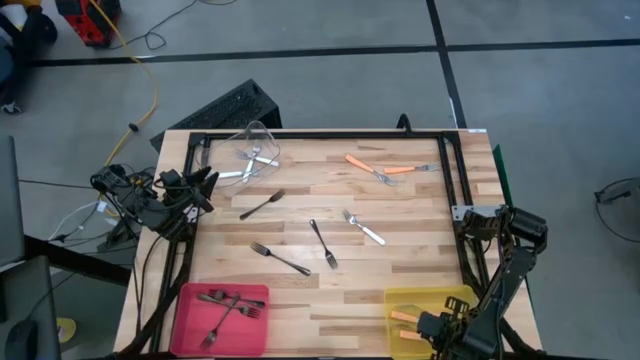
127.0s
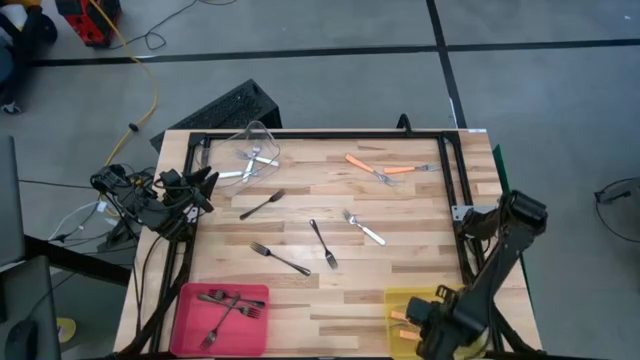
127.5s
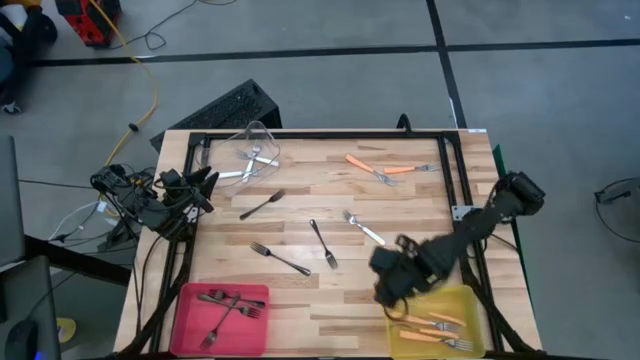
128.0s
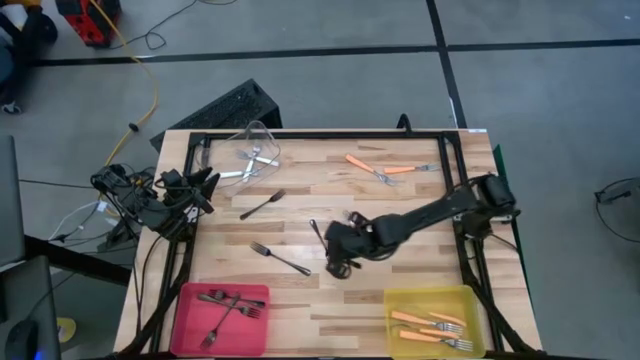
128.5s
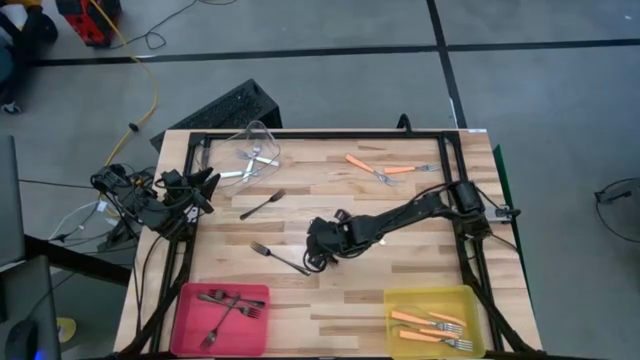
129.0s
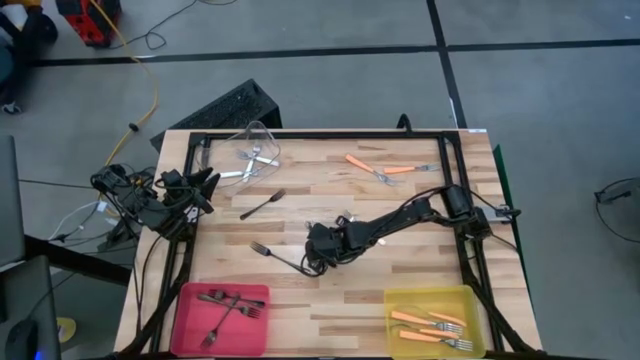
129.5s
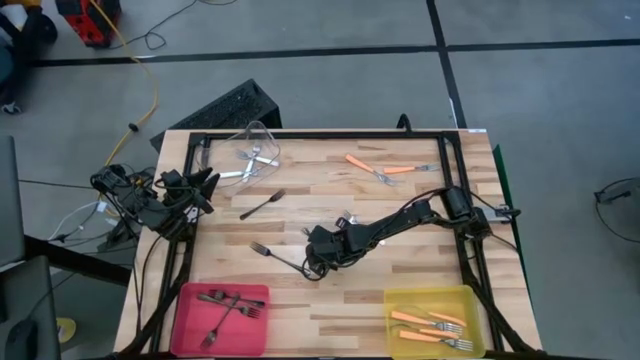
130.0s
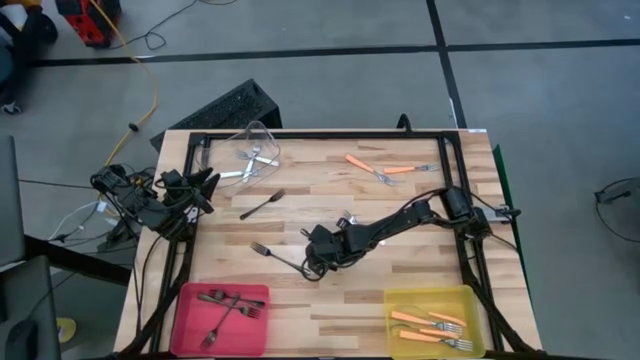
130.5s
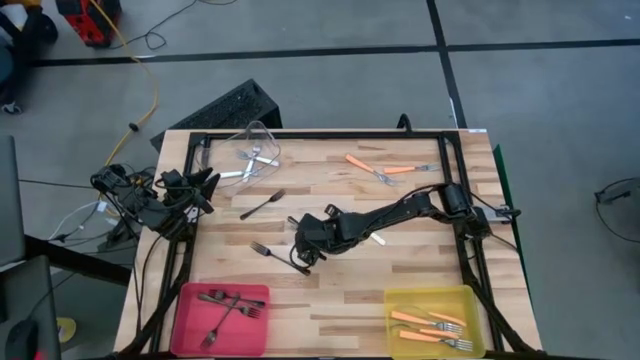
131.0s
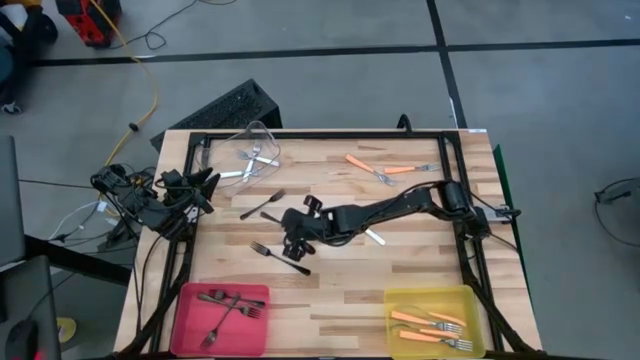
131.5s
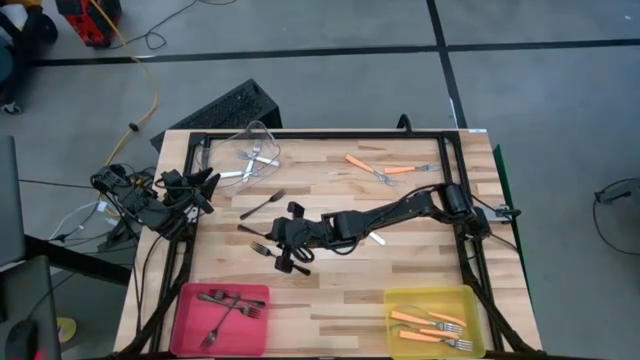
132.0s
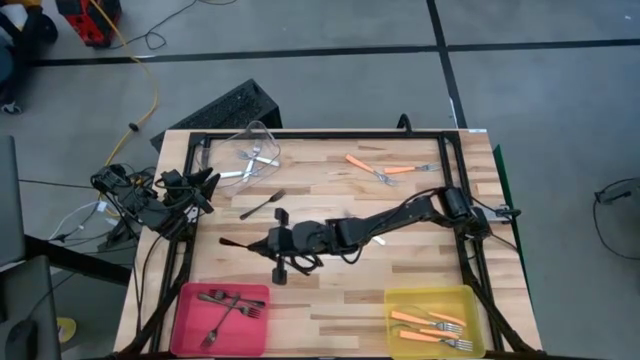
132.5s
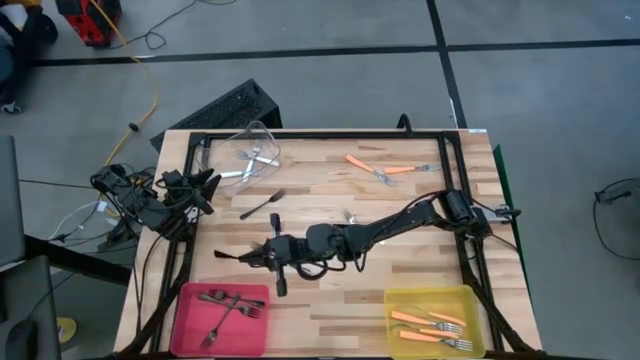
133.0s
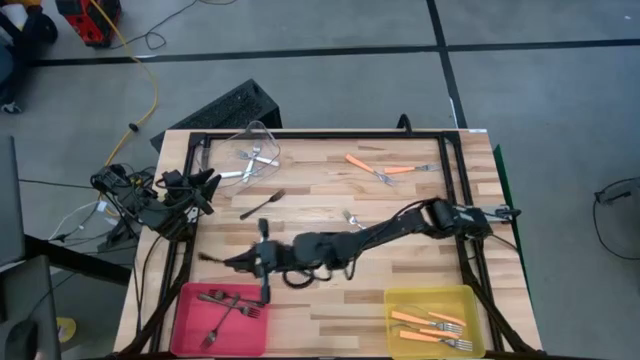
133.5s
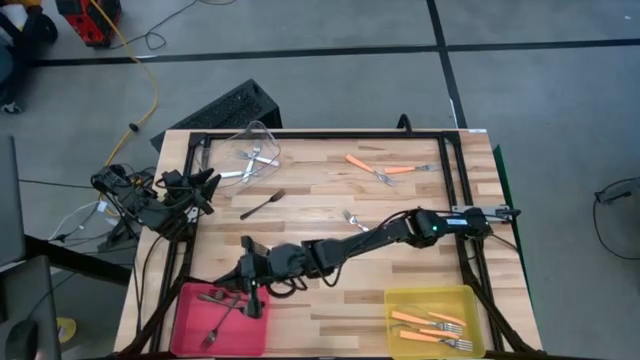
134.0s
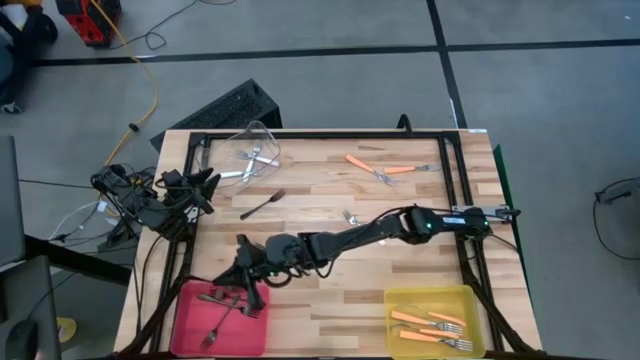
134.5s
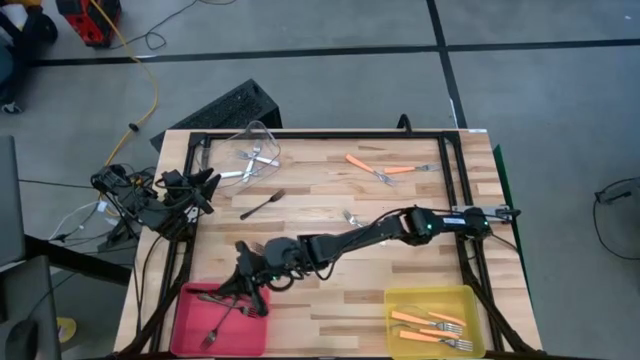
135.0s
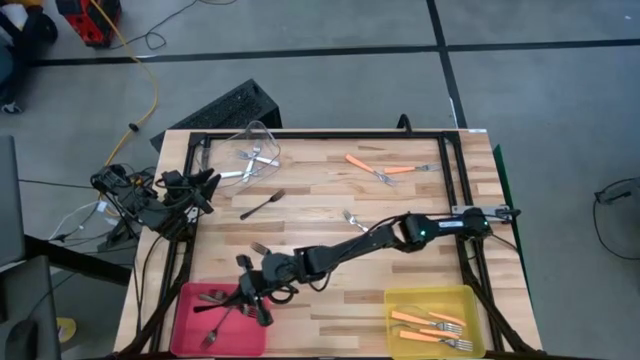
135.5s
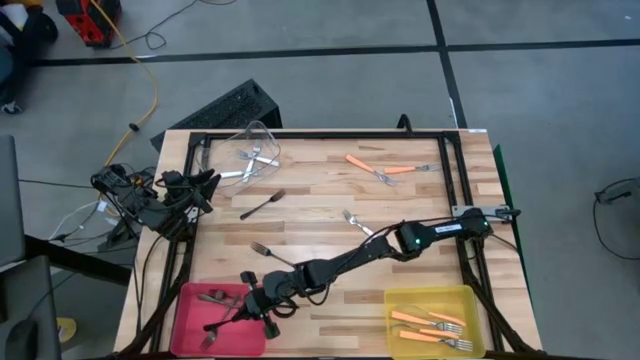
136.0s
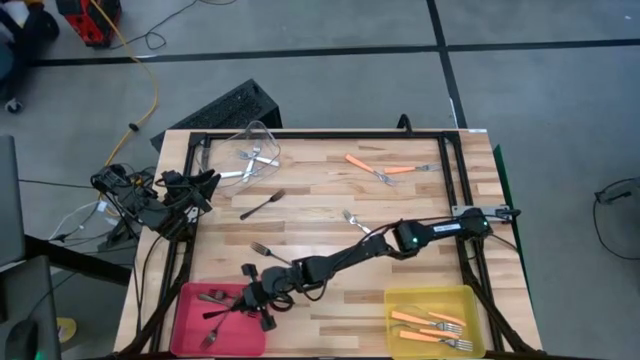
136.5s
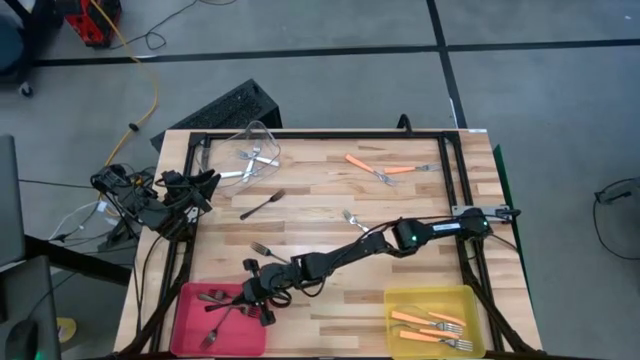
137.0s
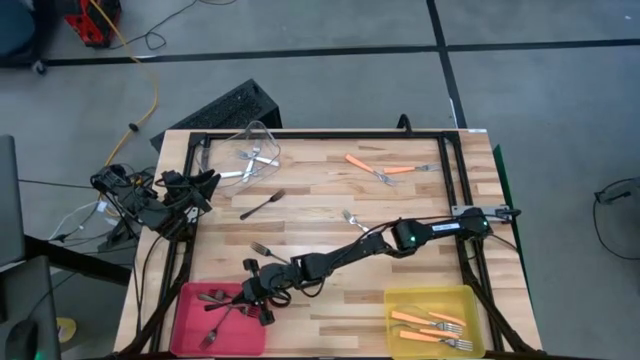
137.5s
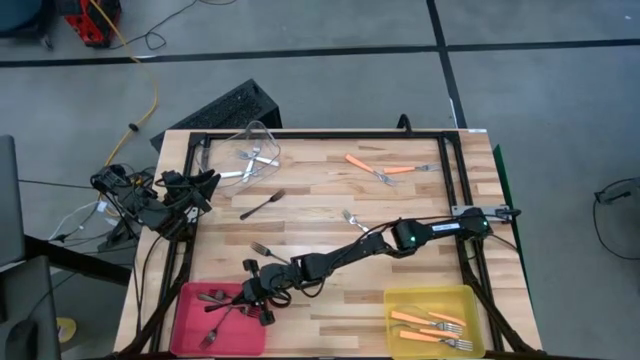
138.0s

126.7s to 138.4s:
Task: Sort silverware by color (type)
Put the black fork into the red bin

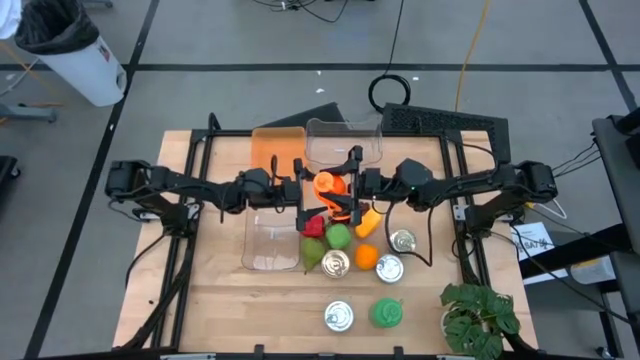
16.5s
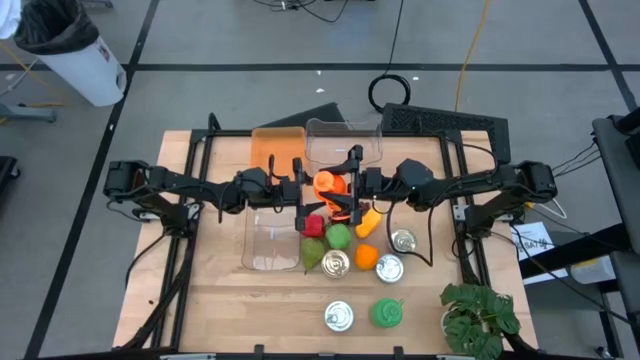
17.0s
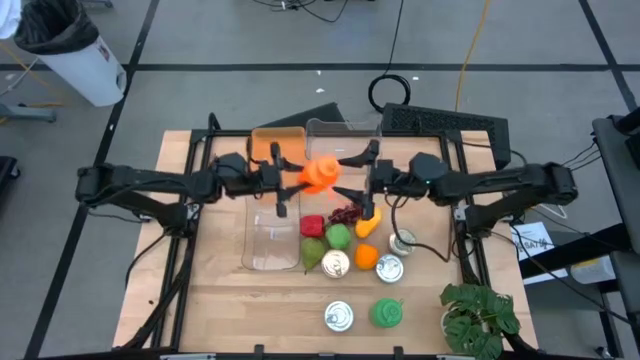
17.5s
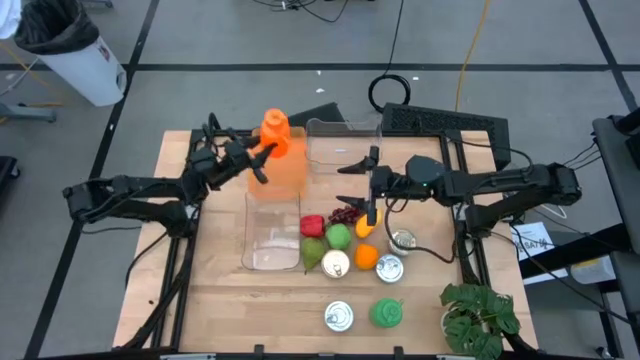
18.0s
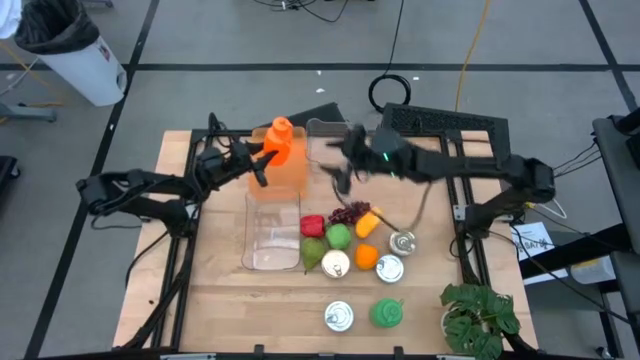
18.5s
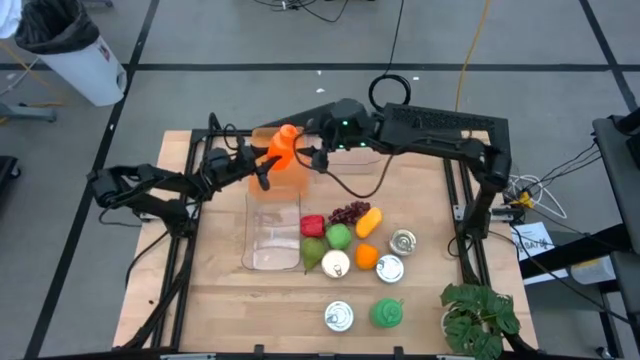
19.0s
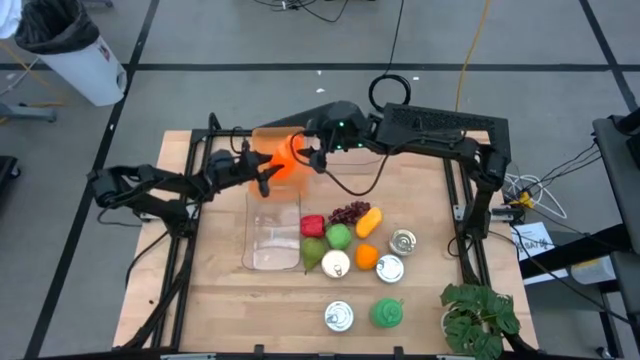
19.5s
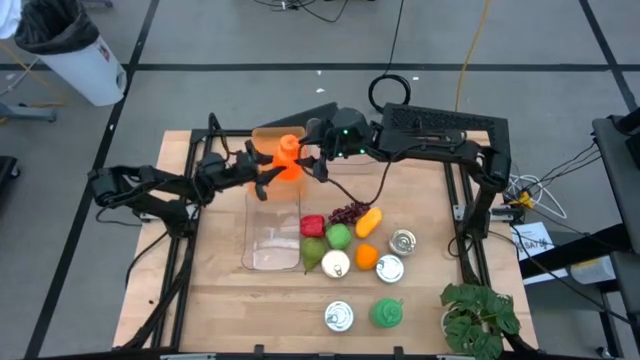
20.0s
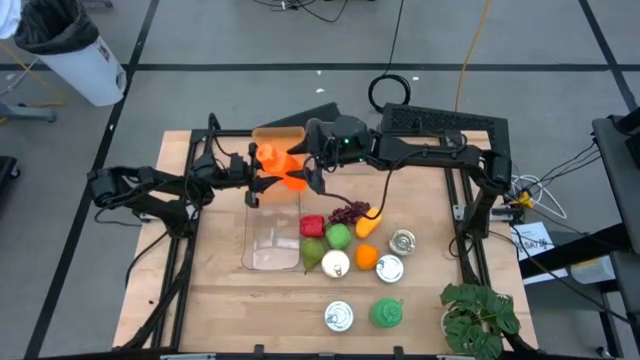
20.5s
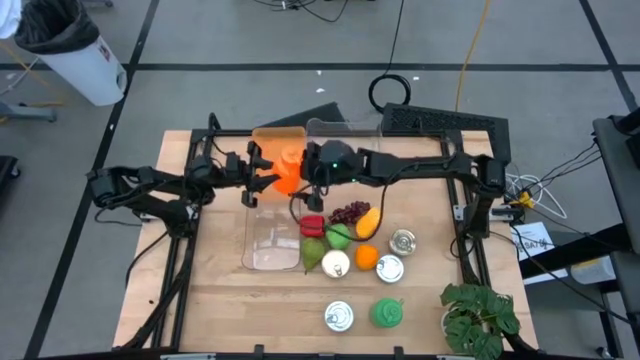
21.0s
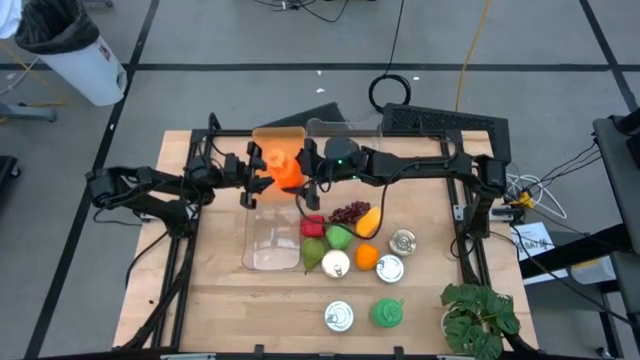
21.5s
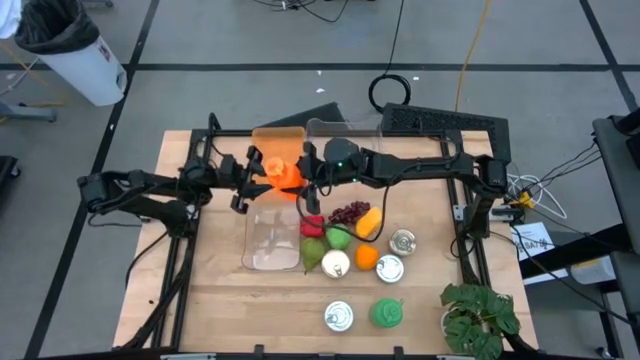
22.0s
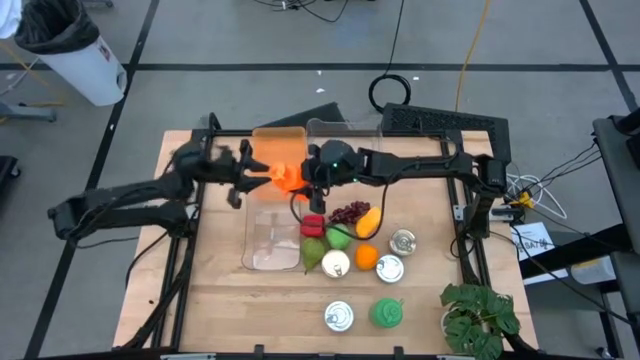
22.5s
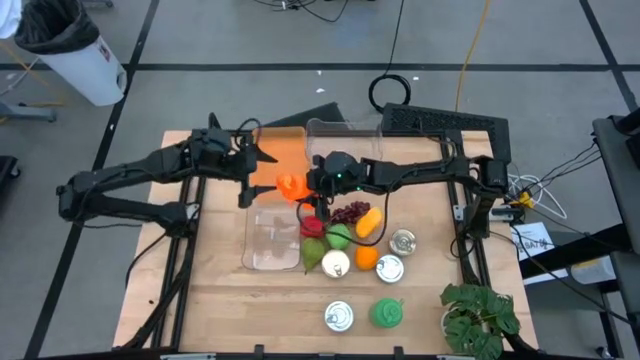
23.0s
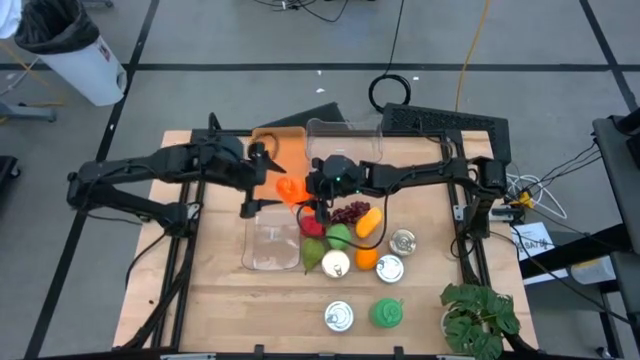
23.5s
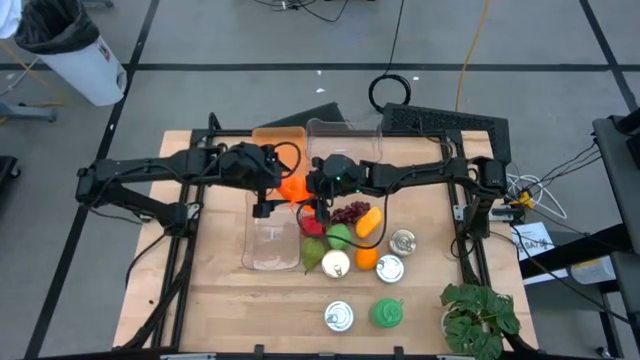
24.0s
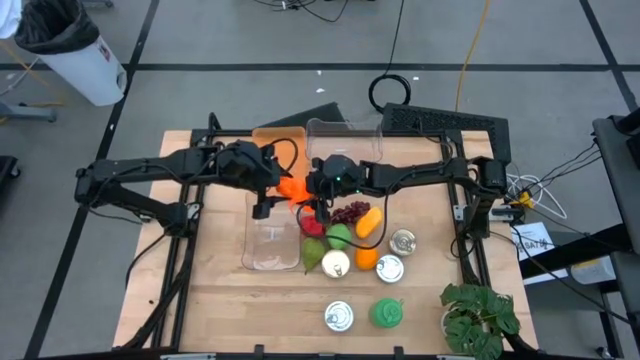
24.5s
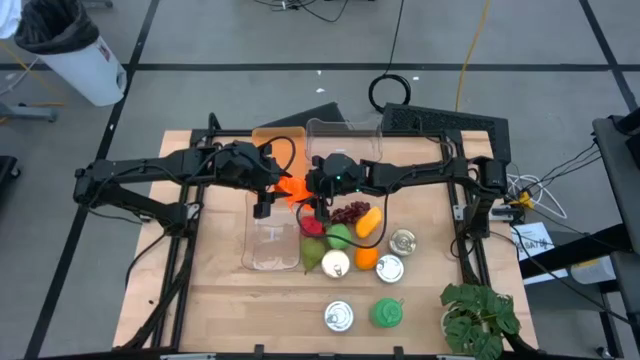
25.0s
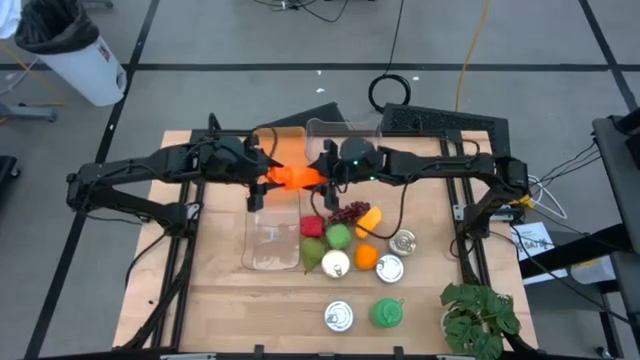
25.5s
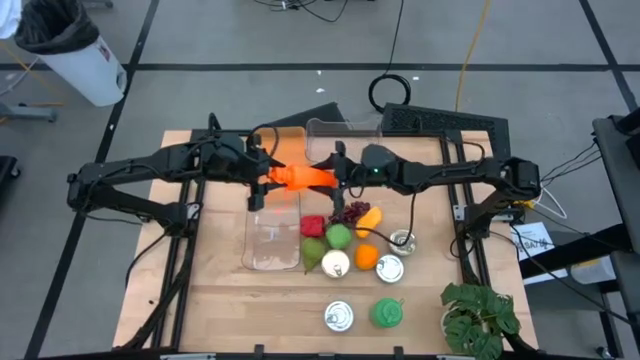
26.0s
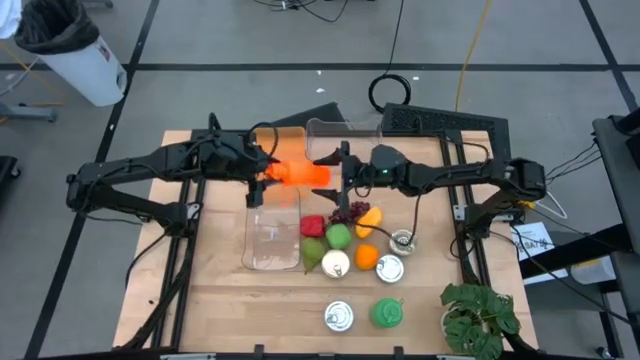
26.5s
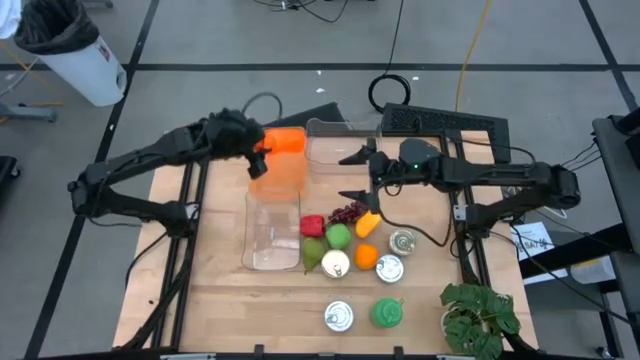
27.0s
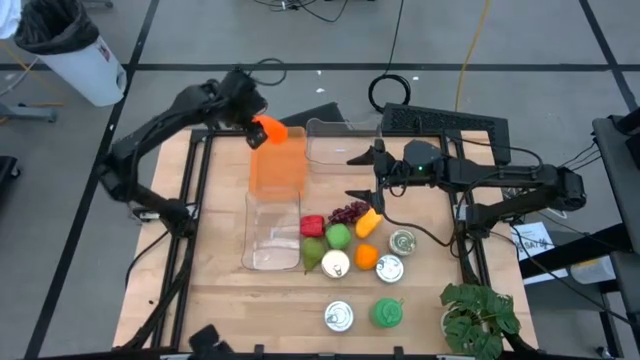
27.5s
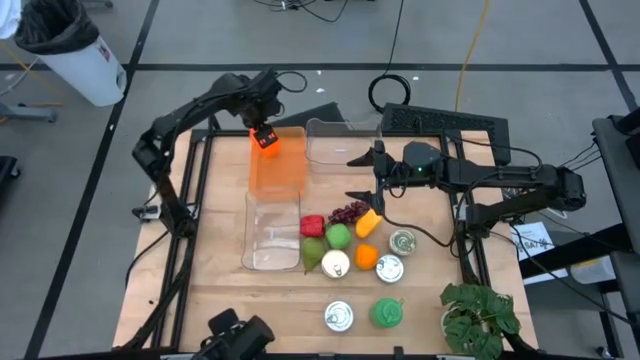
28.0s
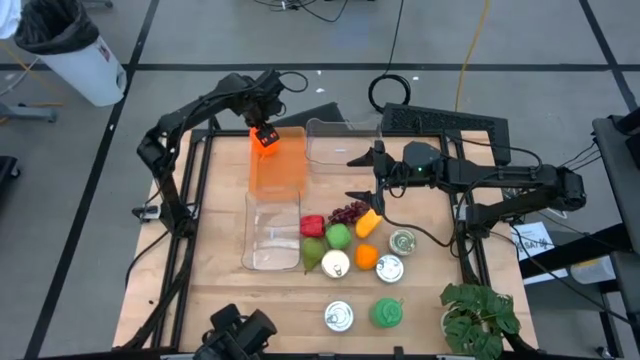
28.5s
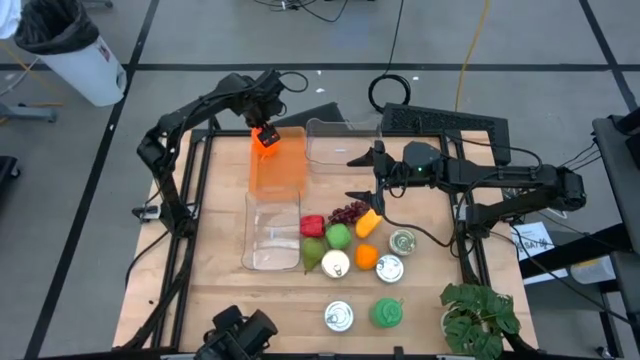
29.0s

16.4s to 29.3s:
Task: Pick & Place Food Item
Put the orange tumbler into the orange bin
